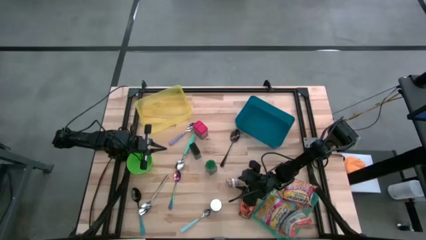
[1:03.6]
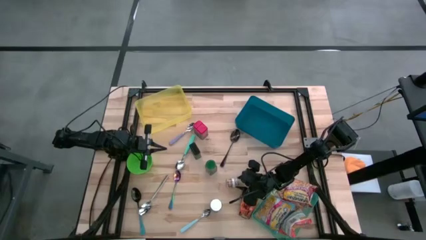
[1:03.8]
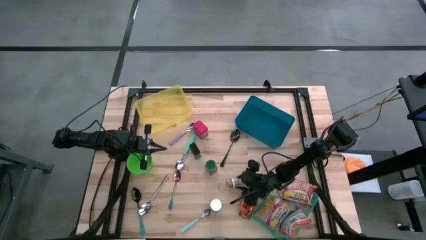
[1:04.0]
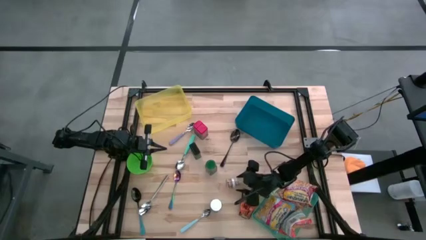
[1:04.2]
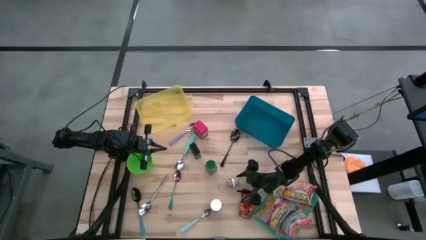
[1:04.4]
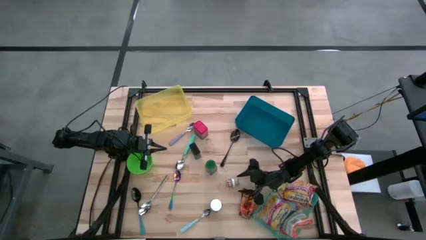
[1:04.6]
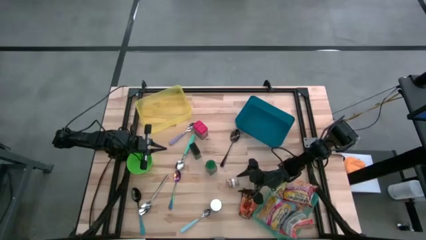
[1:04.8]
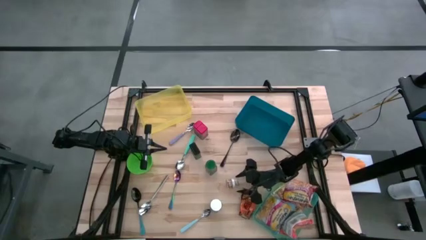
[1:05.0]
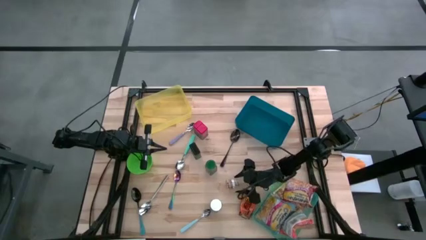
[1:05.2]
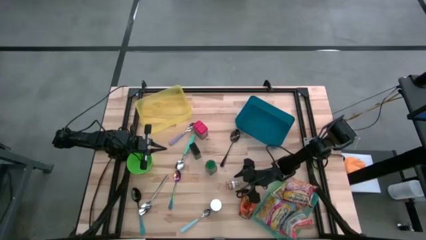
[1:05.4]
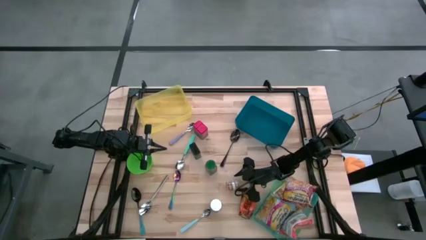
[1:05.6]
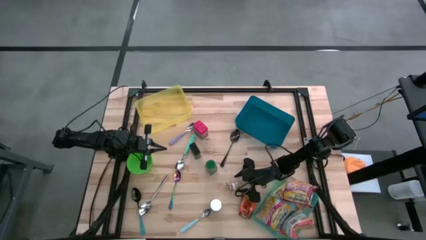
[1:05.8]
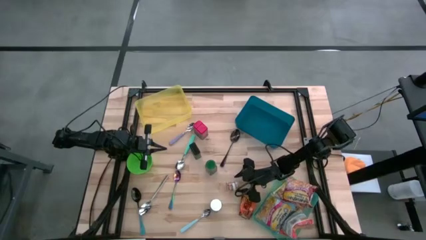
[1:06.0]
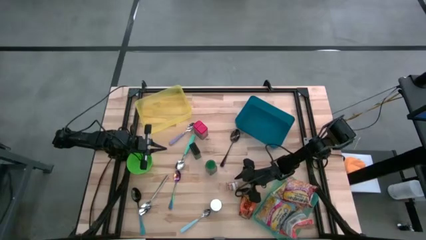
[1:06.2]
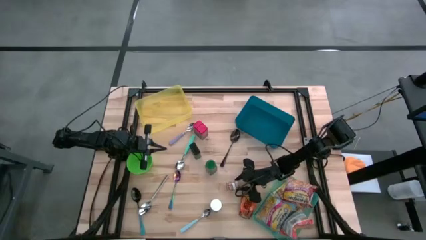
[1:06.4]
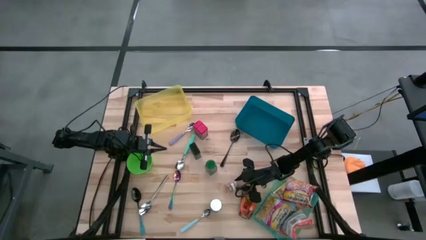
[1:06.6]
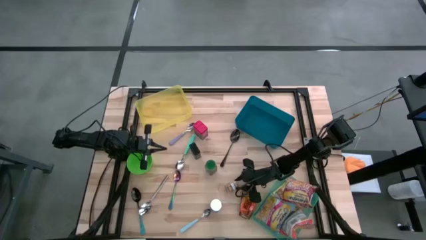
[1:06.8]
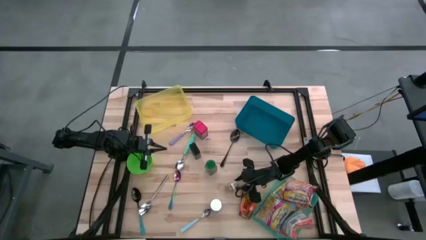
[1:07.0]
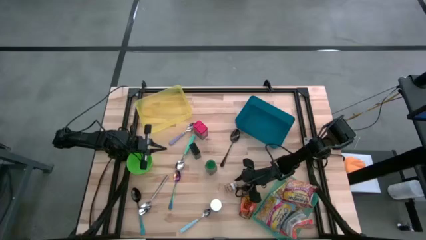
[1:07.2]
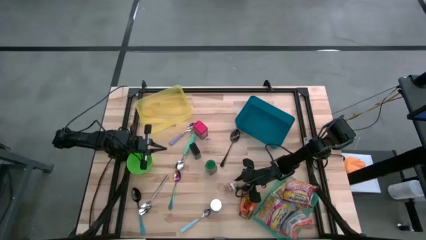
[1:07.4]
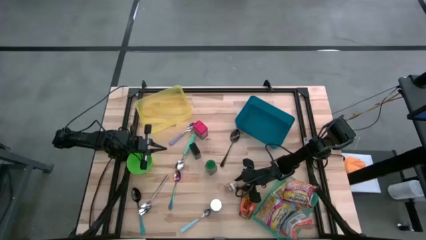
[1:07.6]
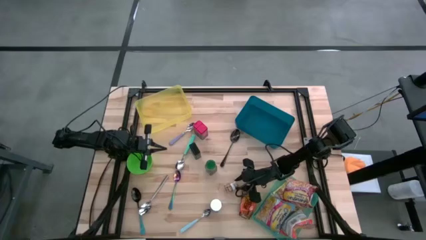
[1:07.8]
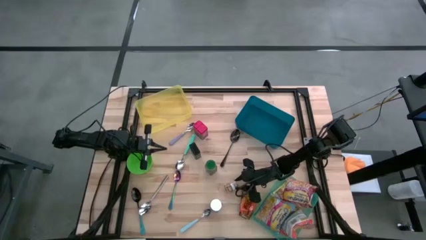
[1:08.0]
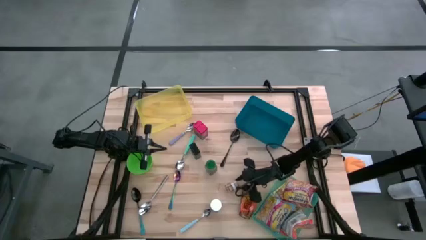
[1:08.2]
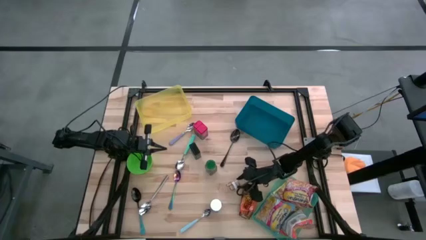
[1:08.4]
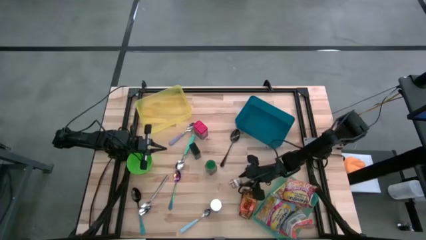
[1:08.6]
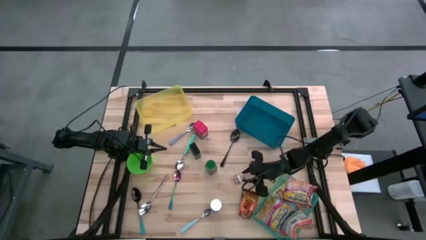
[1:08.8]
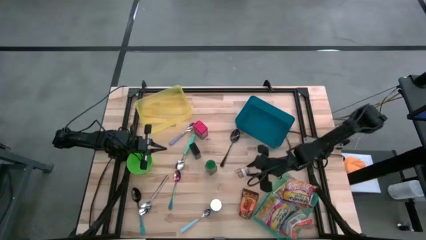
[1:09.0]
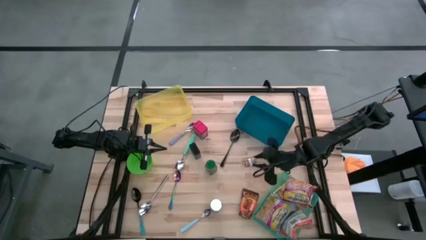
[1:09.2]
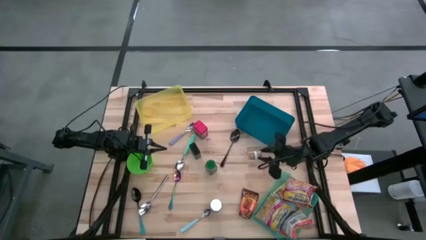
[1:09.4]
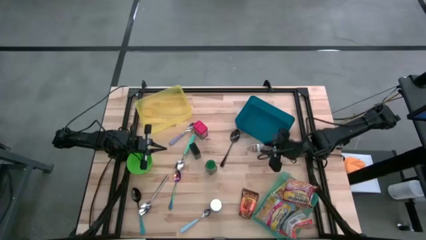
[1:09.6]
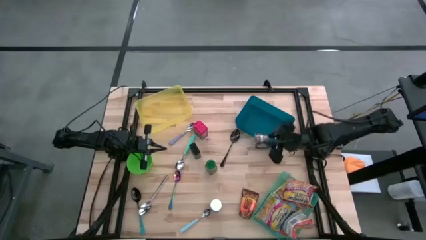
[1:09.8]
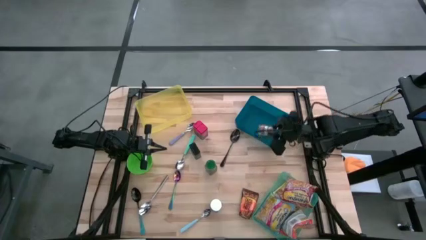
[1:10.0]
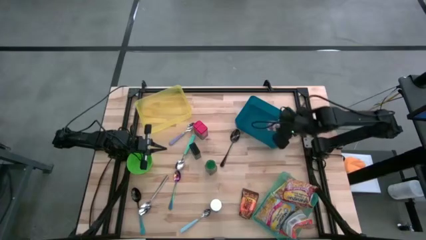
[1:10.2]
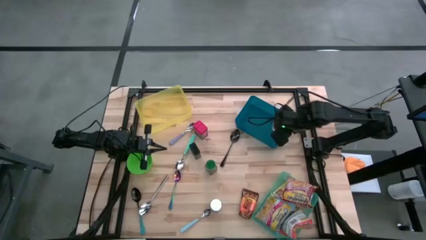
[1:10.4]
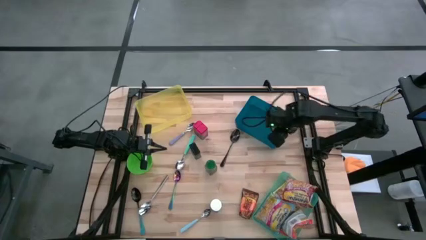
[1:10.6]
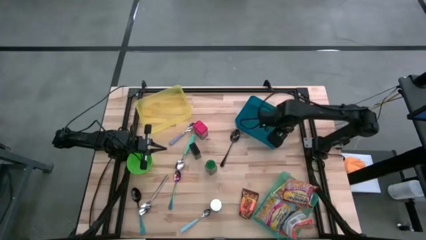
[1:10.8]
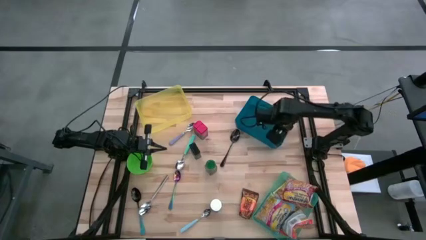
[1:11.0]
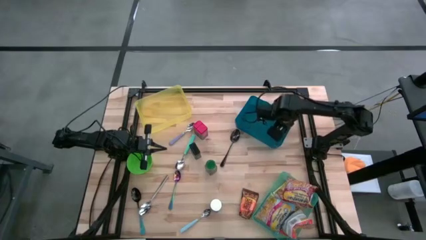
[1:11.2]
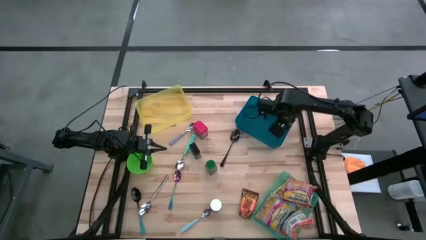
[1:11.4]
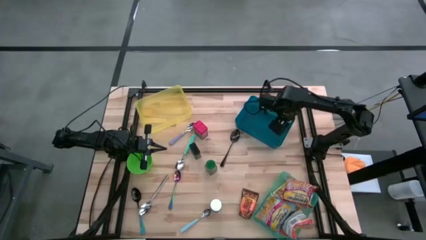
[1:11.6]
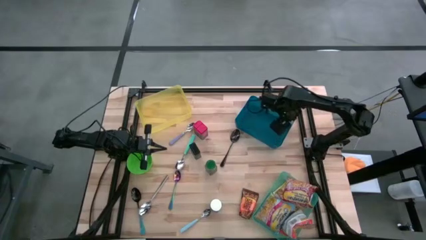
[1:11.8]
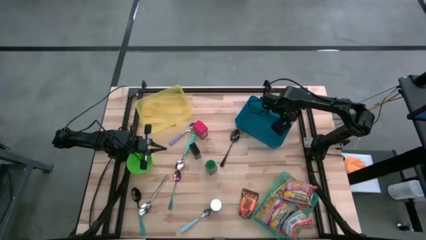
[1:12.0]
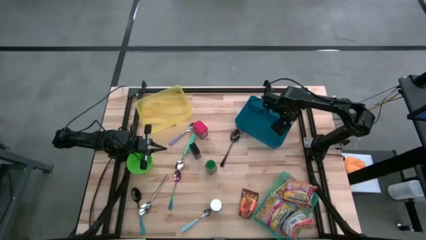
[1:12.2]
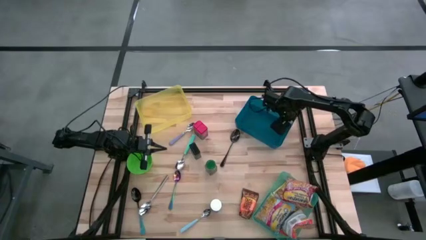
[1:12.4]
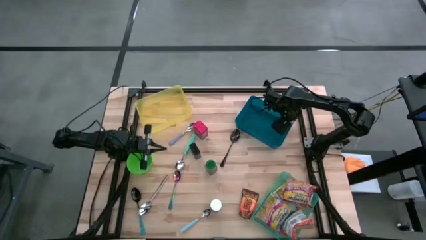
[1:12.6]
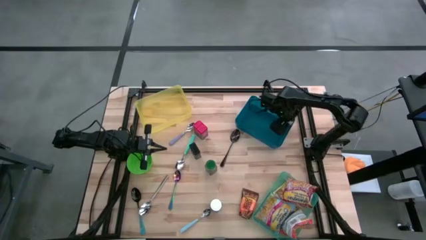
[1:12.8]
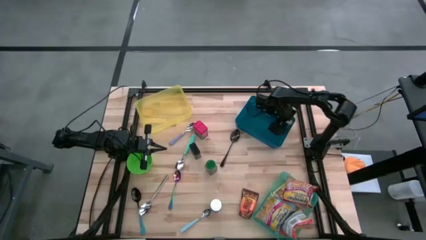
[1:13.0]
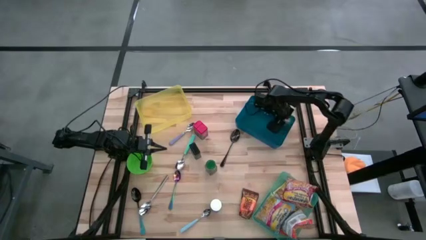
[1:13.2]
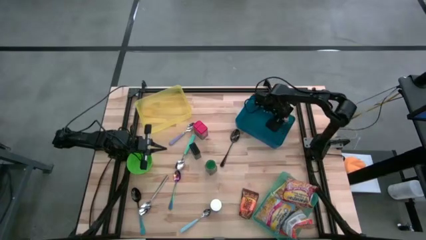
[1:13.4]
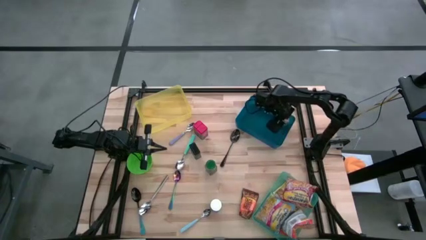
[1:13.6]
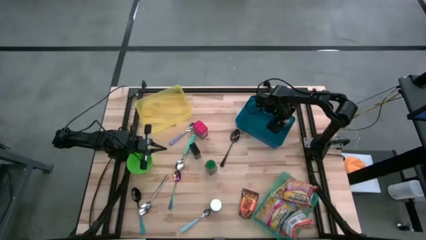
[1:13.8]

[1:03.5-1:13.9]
Put the brown seasoning bottle into the blue bin
